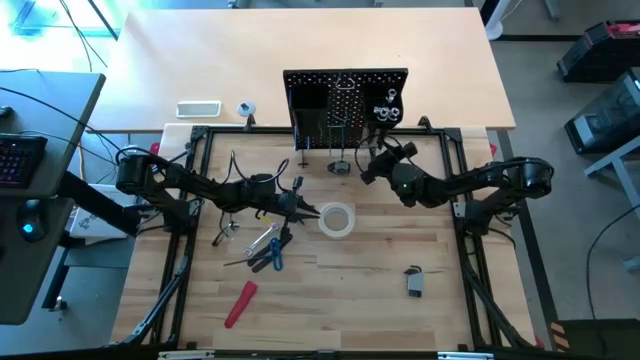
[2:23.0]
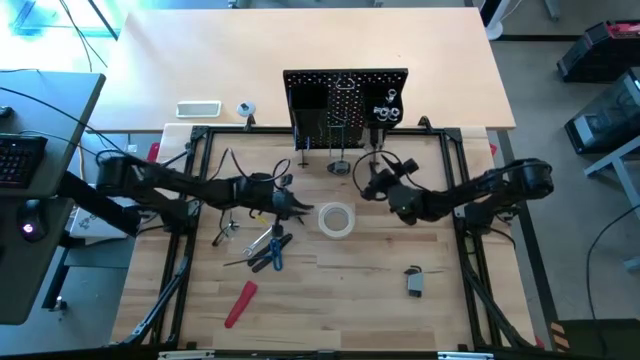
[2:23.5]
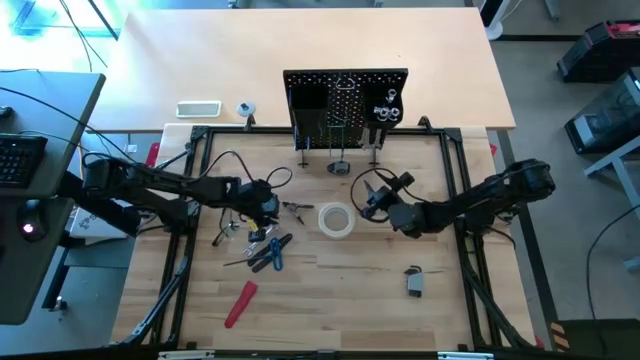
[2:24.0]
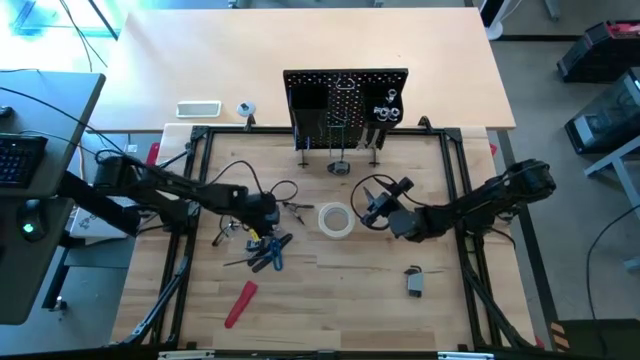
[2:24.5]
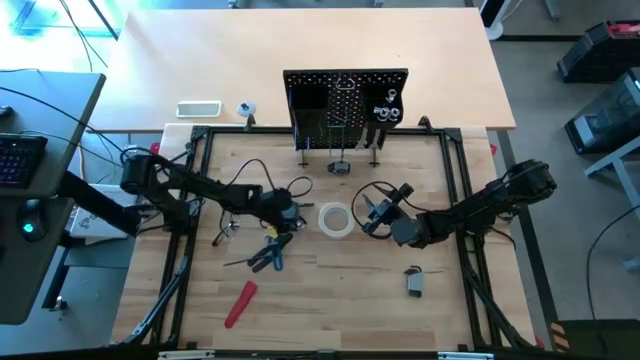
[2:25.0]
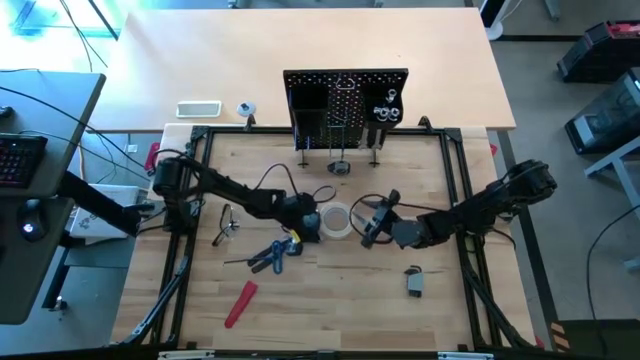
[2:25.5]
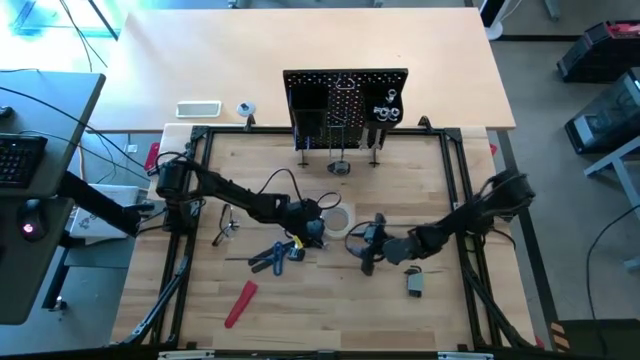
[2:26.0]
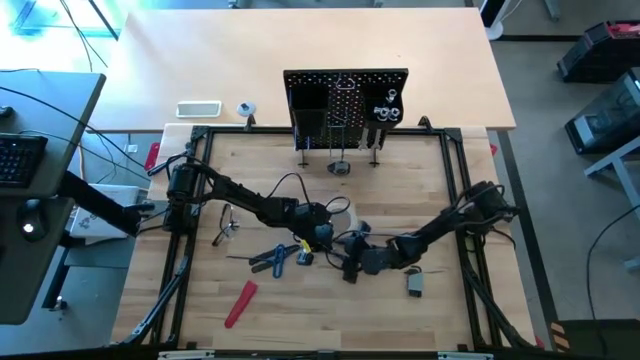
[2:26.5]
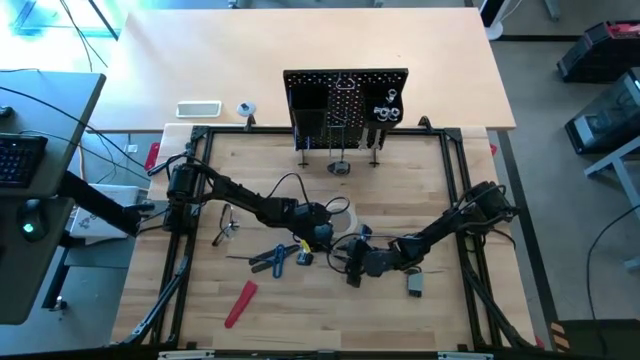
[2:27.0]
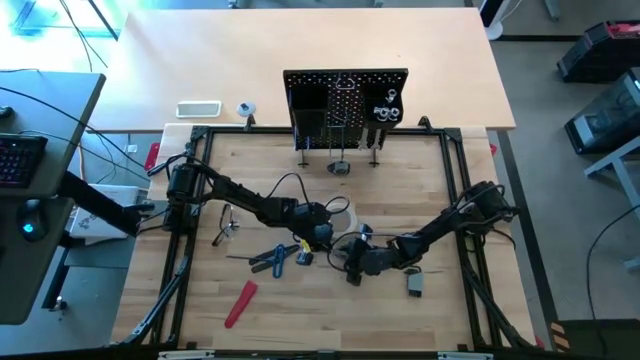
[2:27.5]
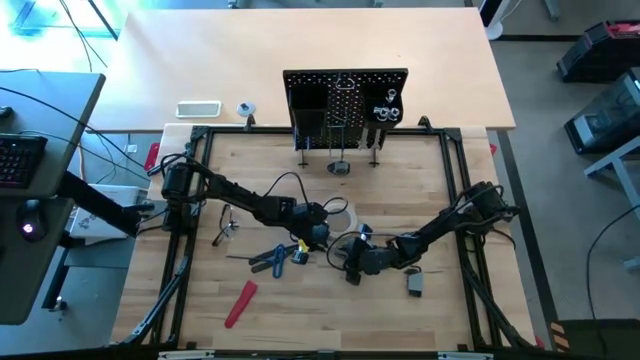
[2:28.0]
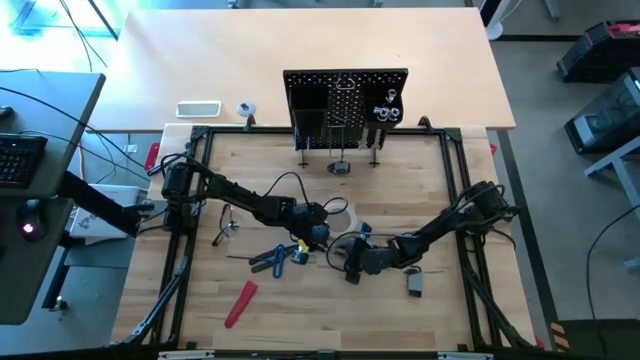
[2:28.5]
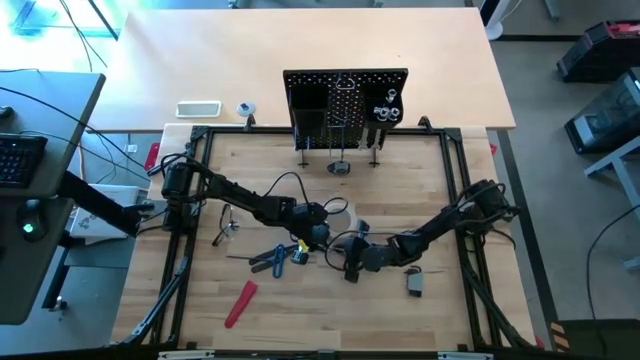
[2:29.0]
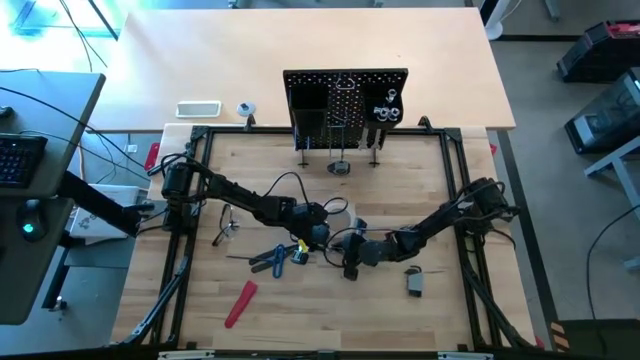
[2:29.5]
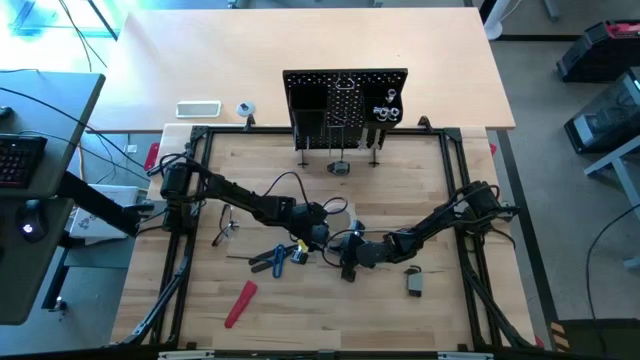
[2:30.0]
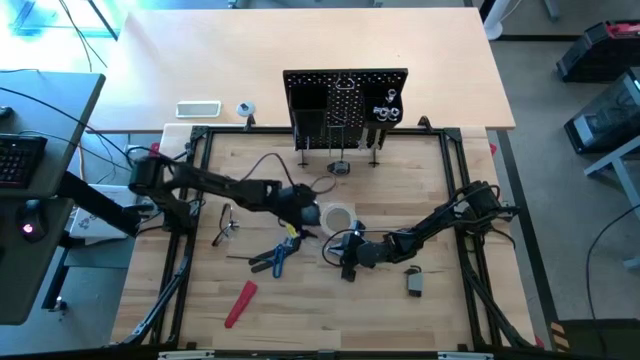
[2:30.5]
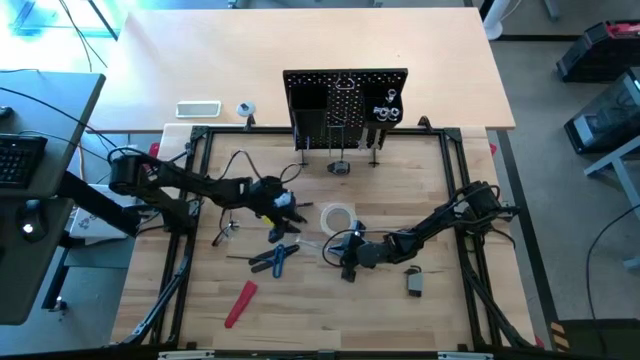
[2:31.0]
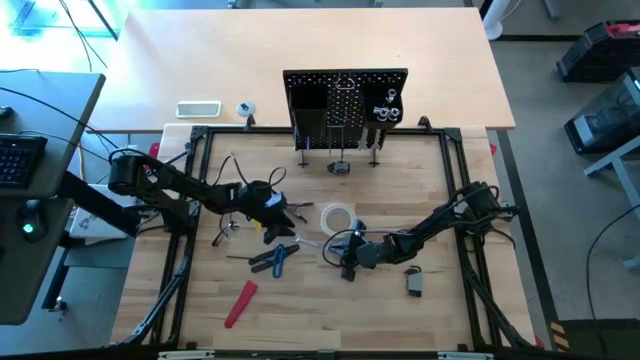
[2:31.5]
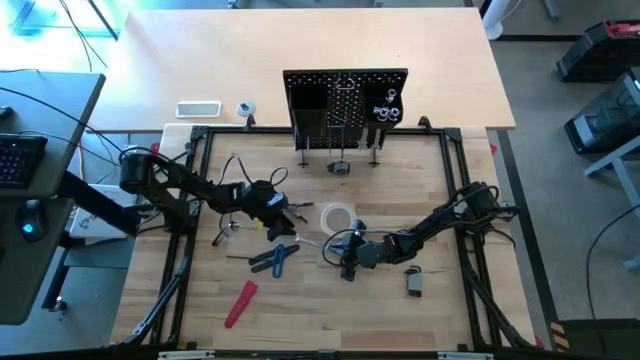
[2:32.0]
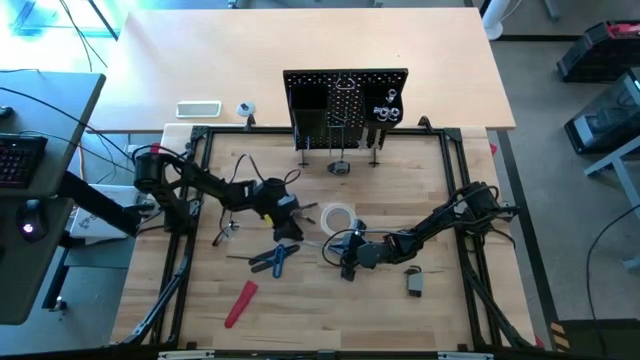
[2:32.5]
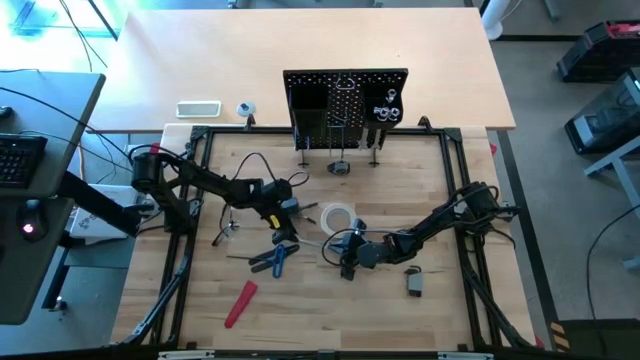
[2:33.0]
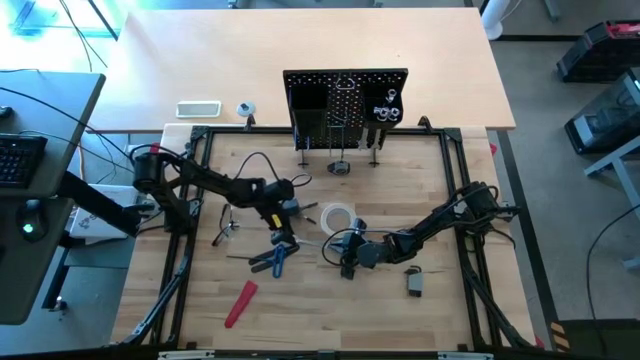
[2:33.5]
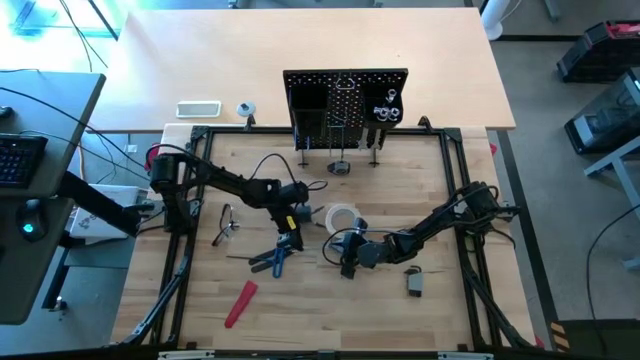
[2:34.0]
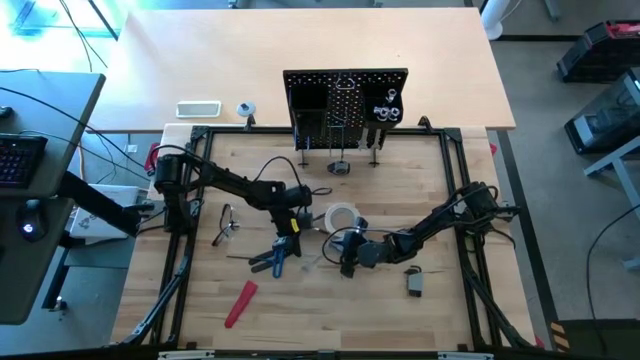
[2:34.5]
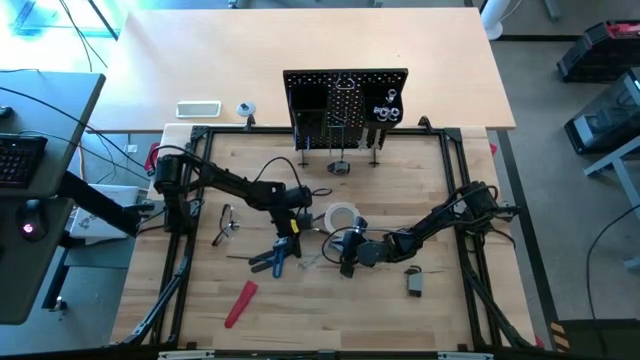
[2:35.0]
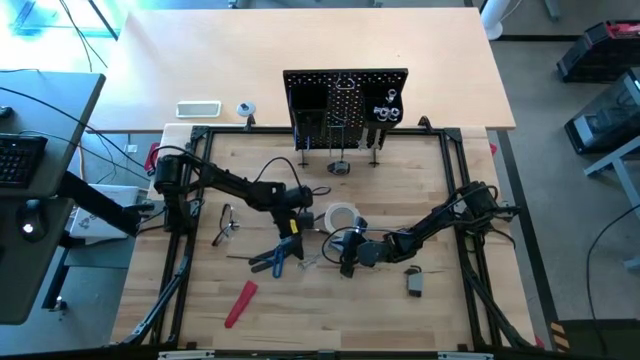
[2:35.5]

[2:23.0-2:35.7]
Task: Hang tools onto peg board
Hang the silver wrench on the peg board

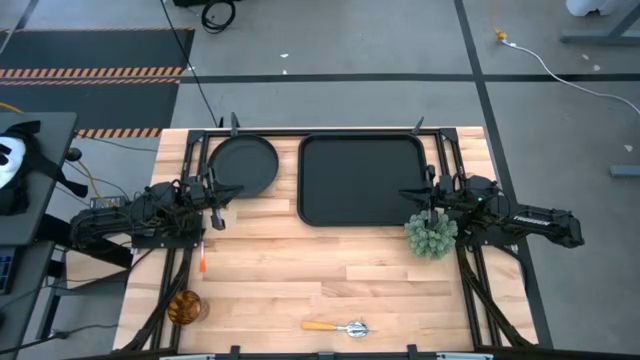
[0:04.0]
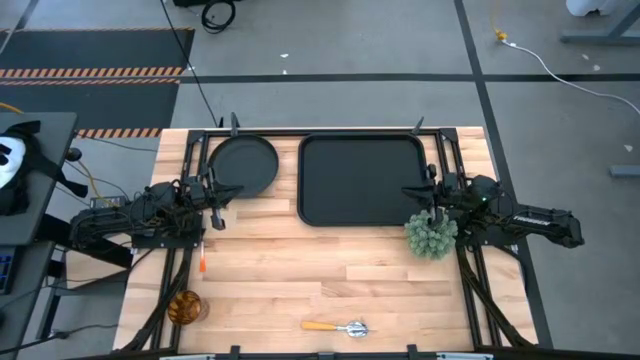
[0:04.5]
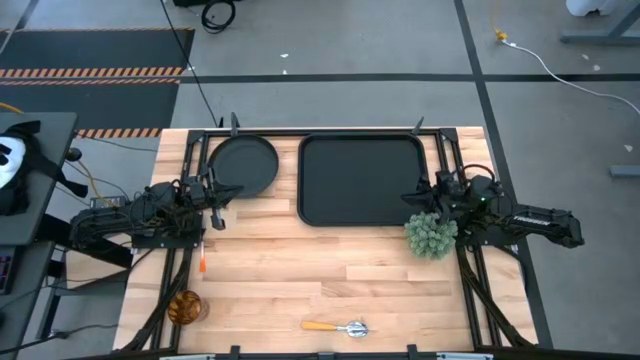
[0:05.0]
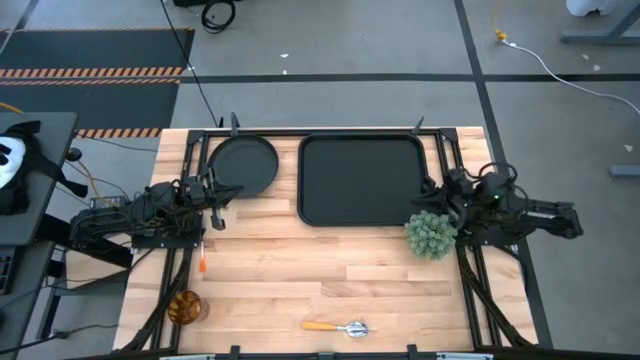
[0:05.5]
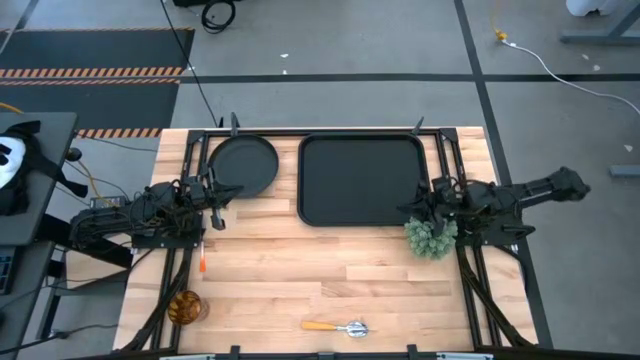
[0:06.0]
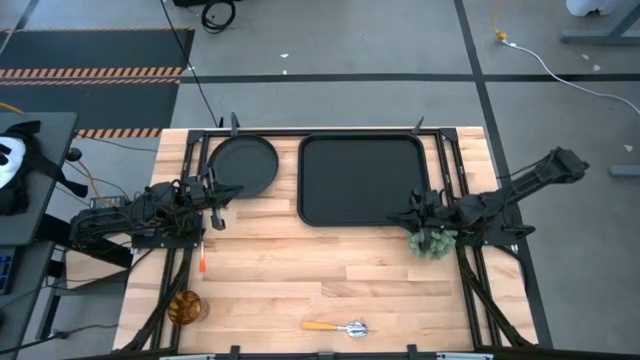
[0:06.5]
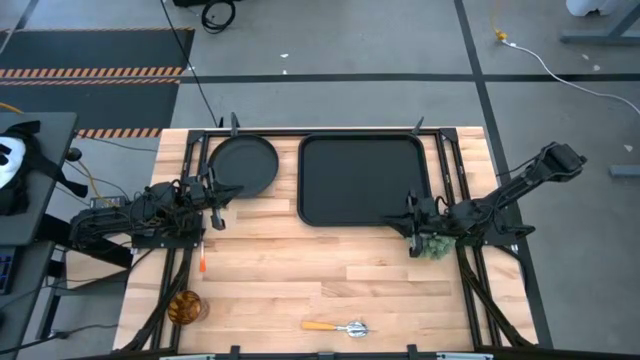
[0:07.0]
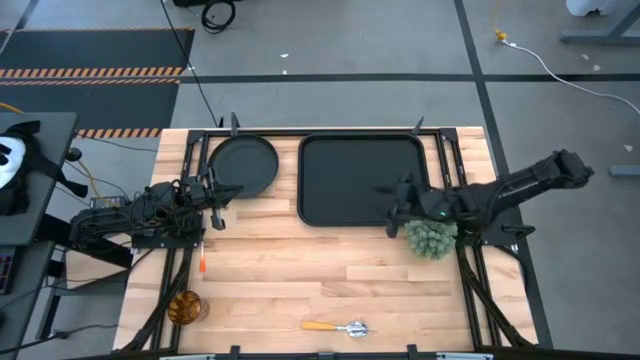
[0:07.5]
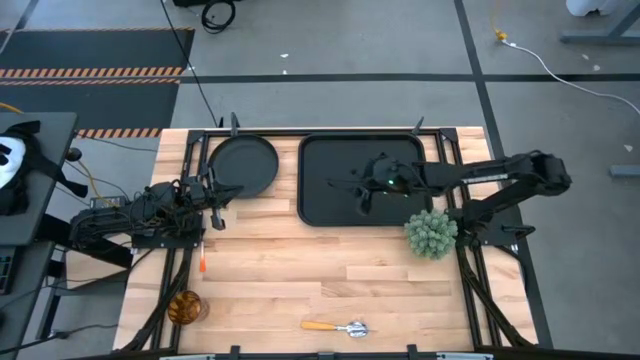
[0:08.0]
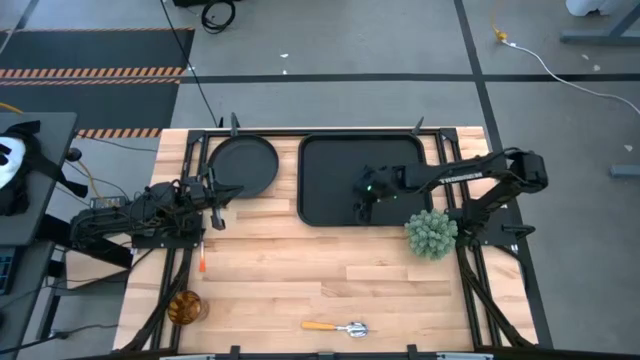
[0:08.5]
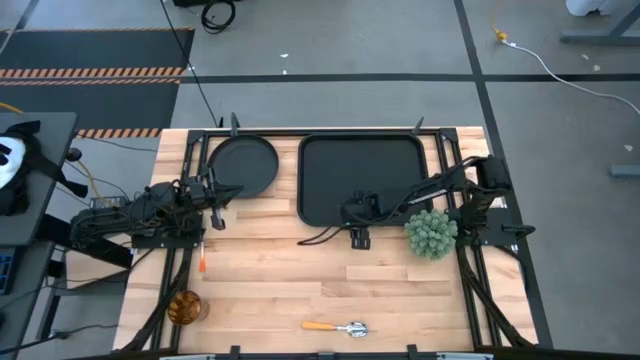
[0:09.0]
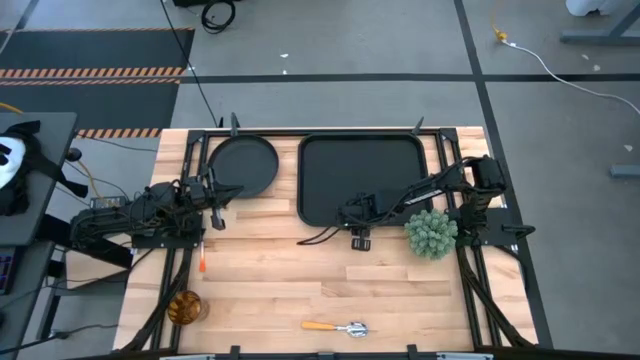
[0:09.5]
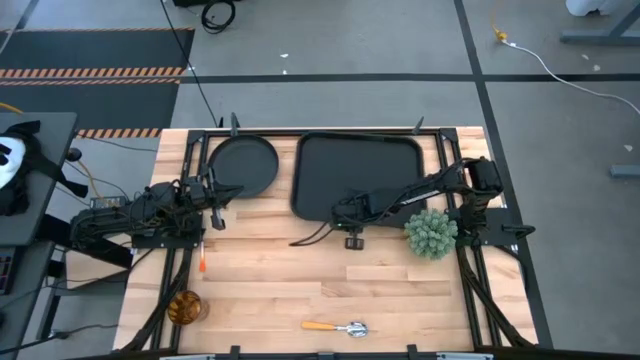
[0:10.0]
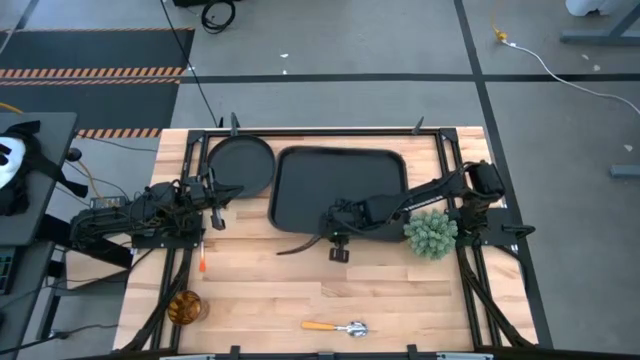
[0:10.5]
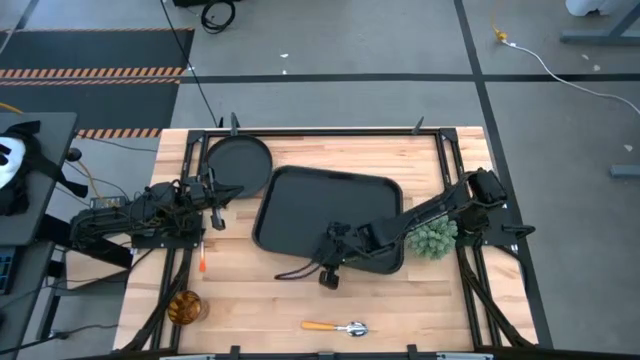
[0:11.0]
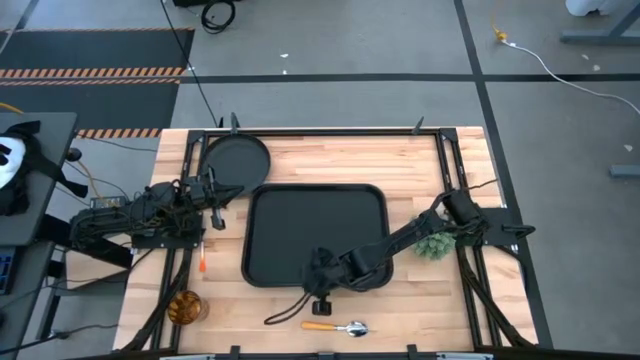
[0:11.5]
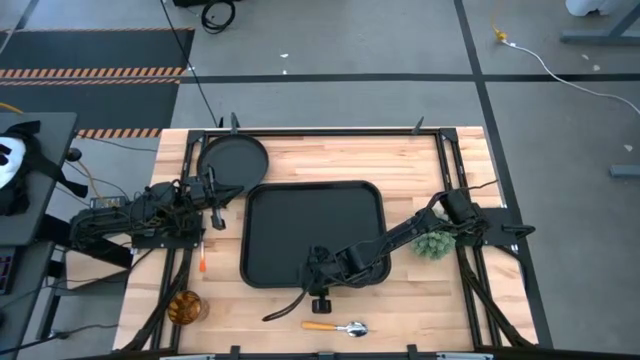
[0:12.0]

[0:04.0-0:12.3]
Task: Pick and place plate/cup/fork/spoon on tray
Move the black tray to the center of the table
